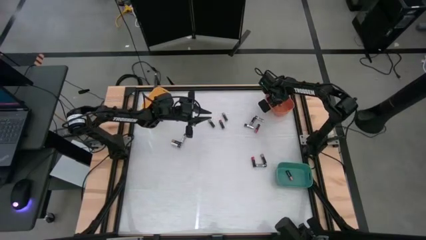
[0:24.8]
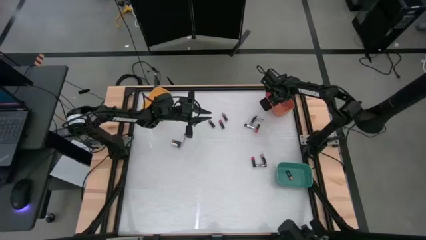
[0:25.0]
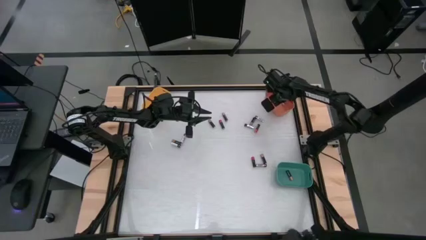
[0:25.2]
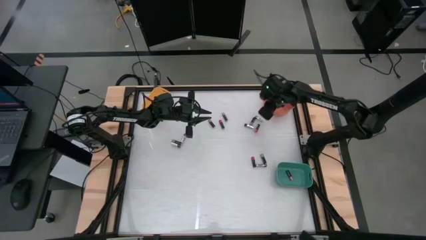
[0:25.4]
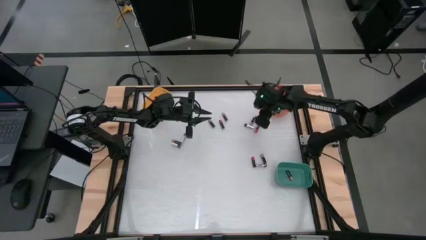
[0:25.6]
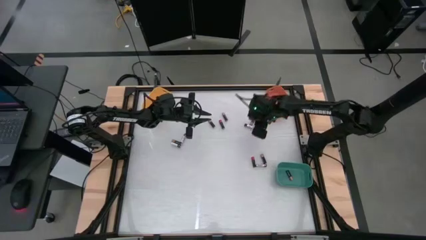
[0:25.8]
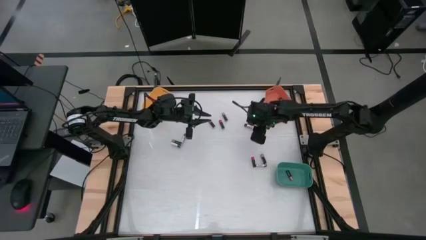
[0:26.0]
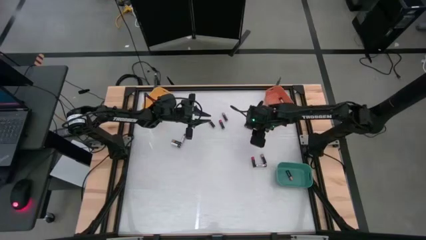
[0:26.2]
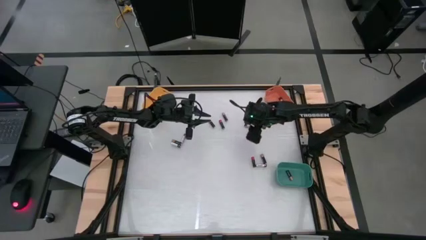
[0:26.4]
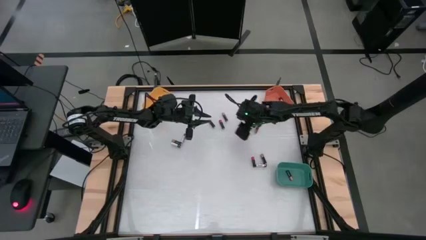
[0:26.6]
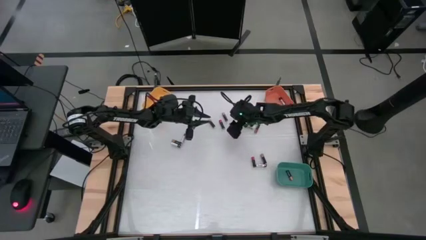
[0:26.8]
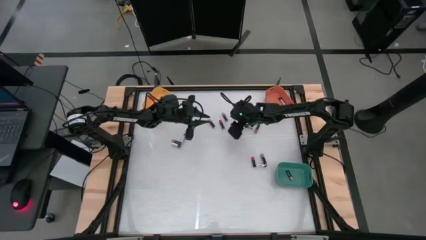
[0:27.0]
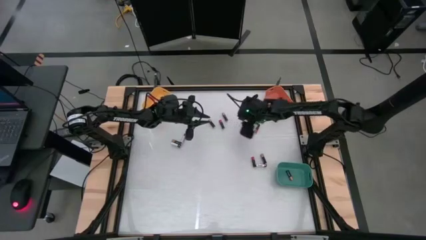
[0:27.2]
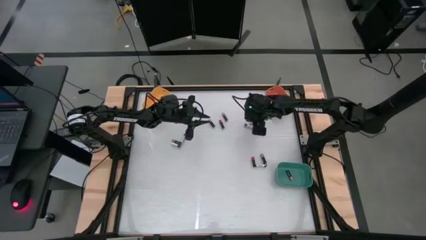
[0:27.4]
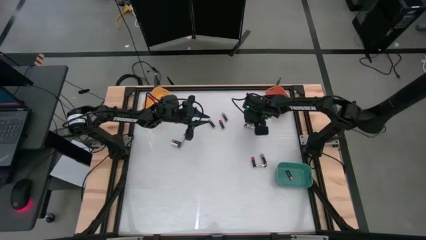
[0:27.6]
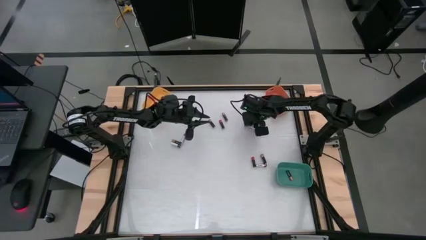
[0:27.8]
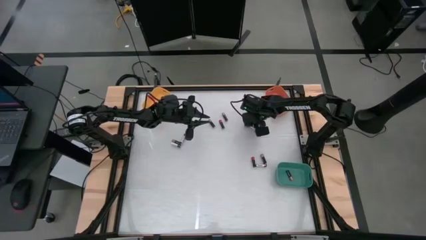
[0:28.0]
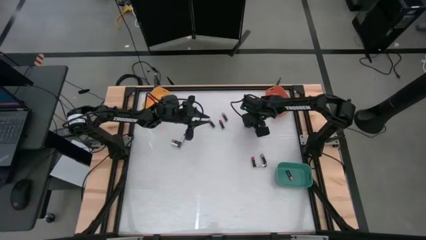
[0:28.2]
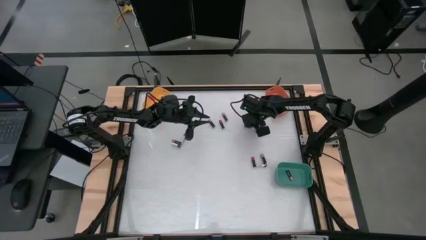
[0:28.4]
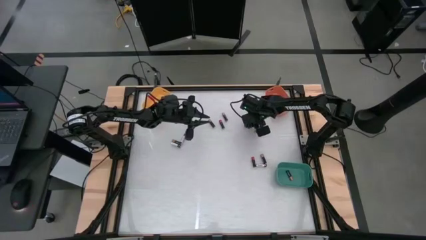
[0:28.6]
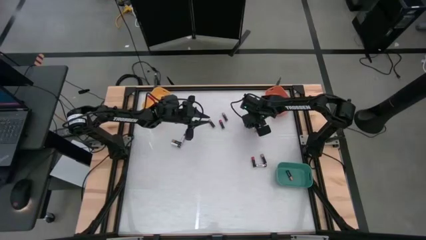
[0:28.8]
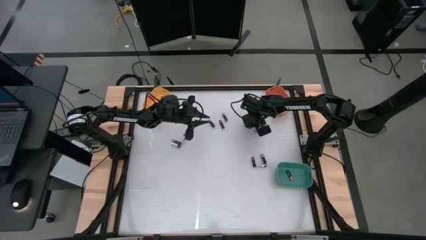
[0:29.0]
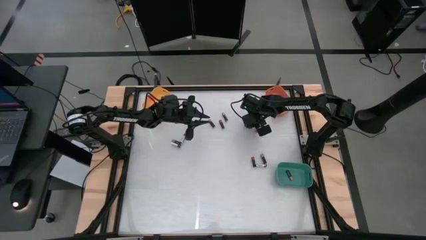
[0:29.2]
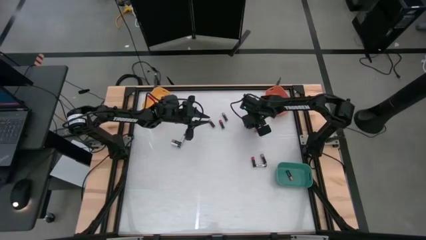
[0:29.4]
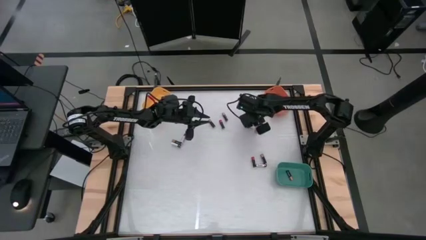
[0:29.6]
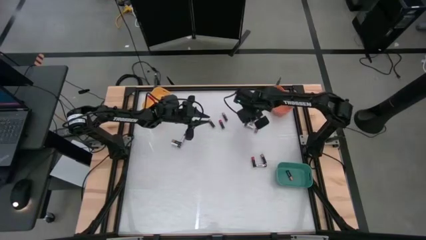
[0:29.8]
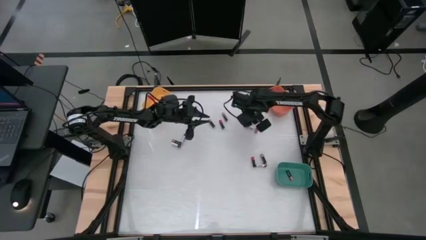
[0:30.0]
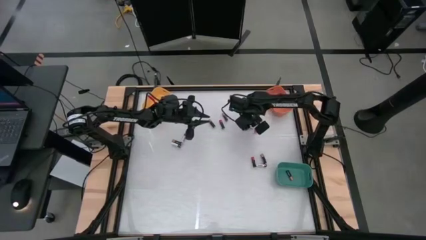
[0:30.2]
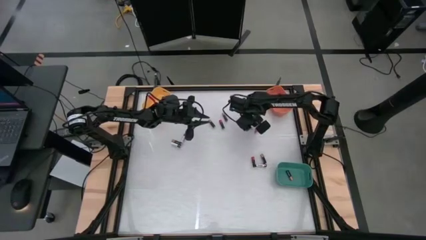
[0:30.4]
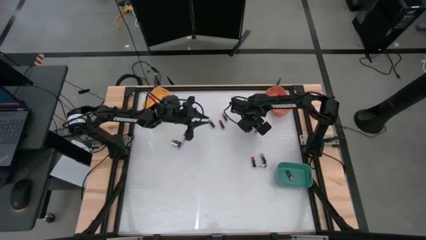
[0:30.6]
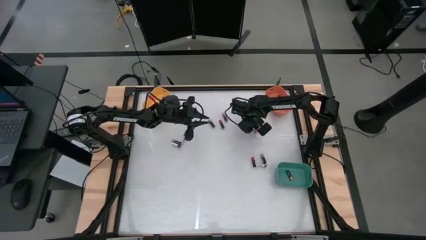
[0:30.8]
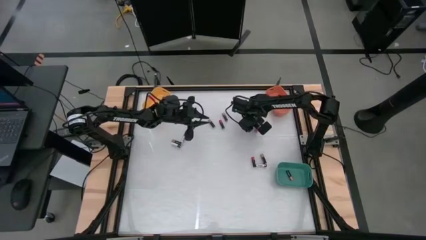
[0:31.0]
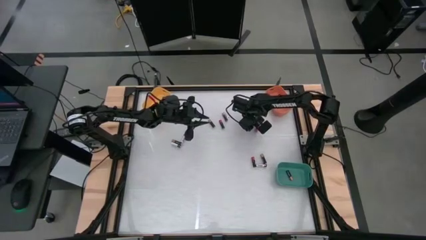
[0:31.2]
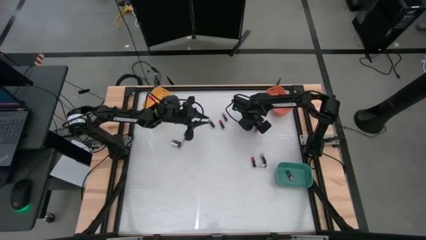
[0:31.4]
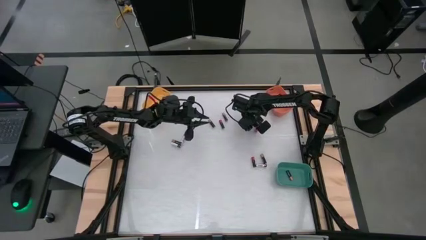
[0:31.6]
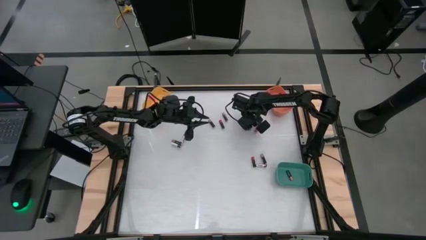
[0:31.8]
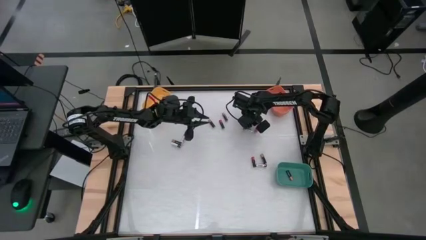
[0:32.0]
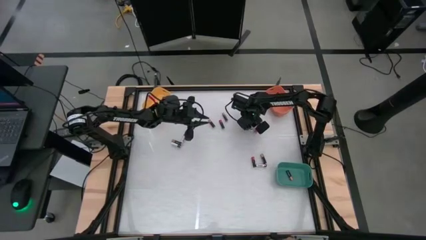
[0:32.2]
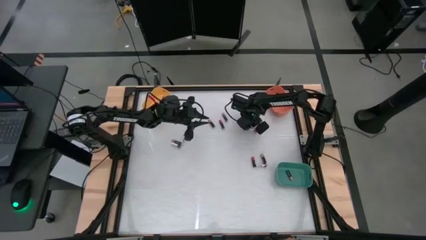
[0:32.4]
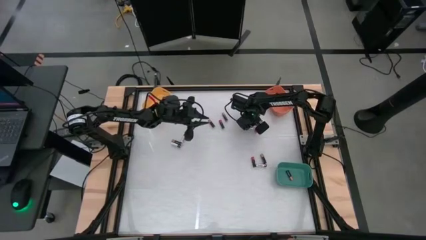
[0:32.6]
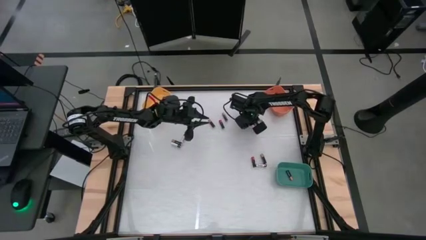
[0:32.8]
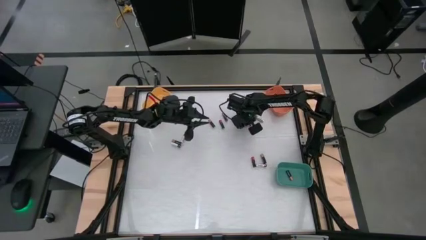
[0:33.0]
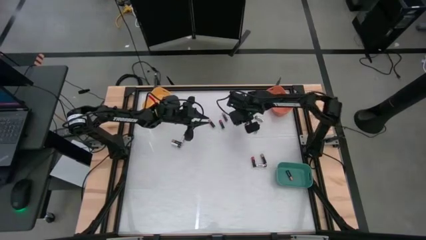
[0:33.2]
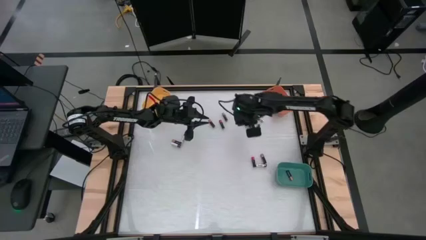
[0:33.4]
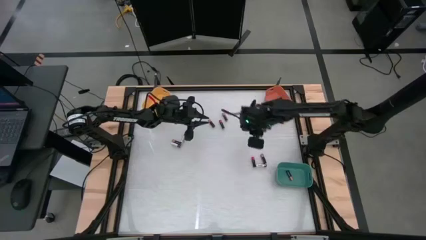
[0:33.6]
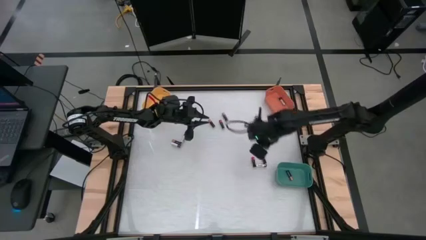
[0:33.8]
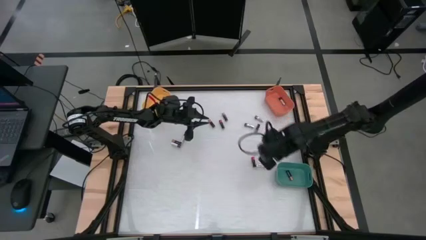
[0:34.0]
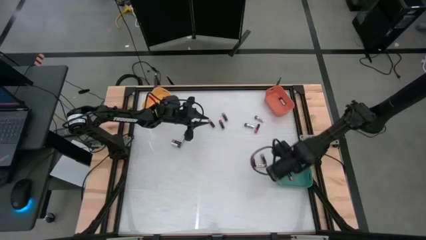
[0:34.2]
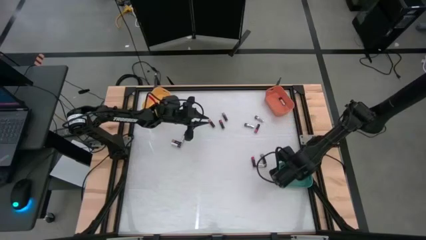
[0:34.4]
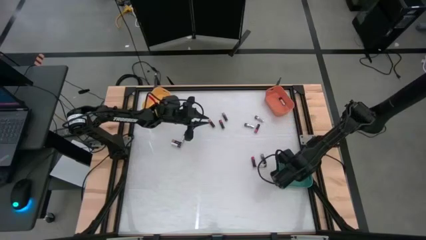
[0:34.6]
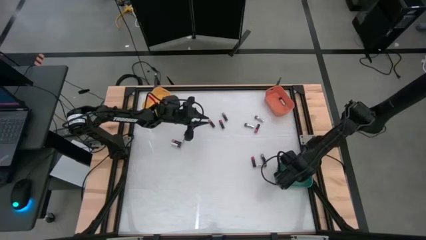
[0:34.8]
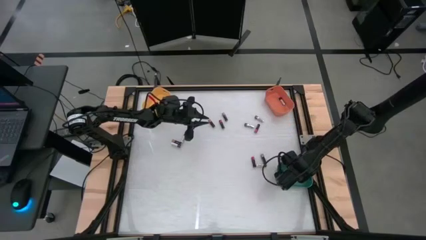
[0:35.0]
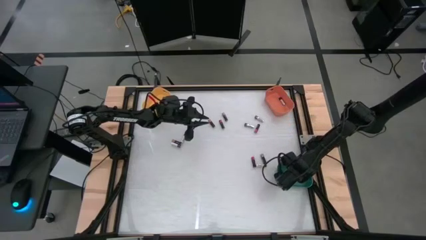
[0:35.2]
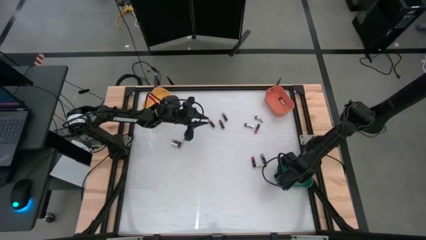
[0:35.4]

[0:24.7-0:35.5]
Task: Sort batteries
Put the brown battery into the green bin

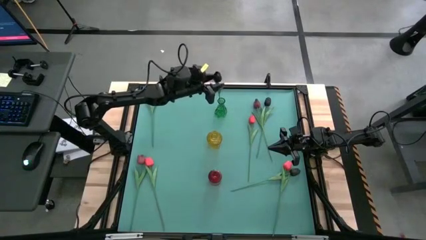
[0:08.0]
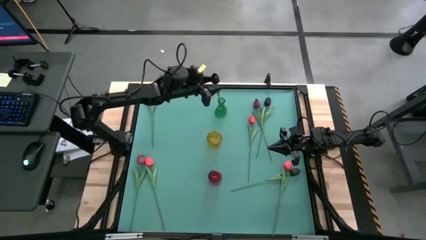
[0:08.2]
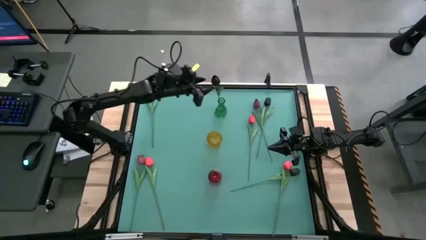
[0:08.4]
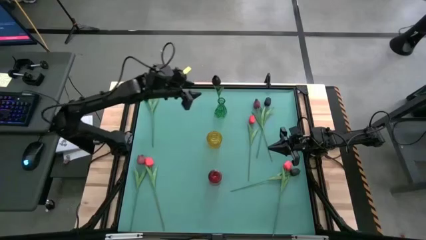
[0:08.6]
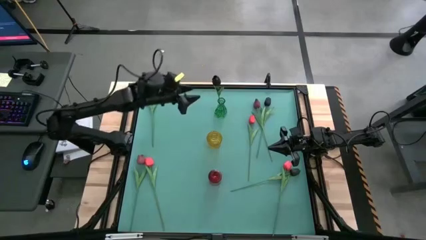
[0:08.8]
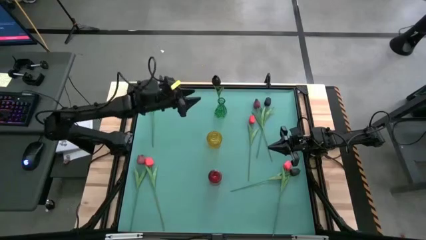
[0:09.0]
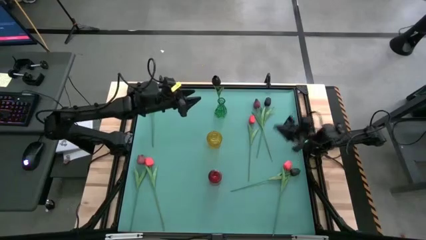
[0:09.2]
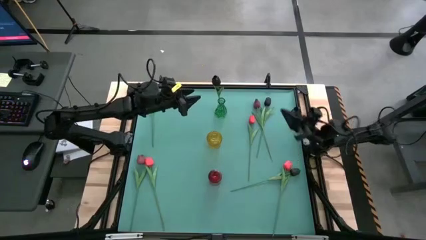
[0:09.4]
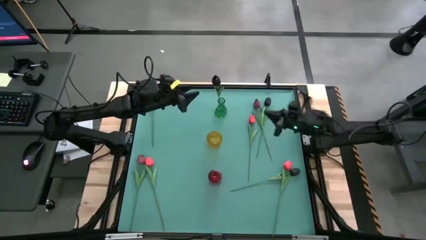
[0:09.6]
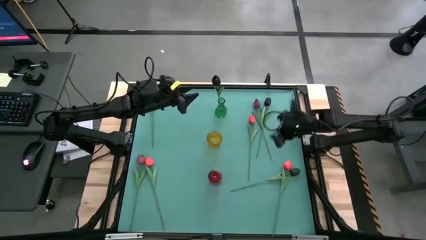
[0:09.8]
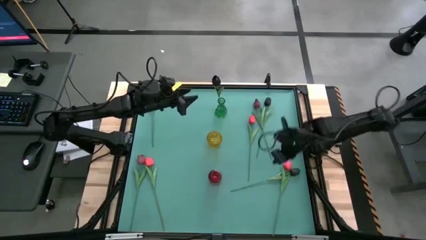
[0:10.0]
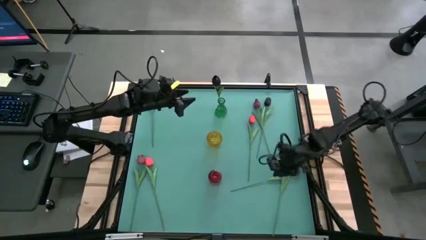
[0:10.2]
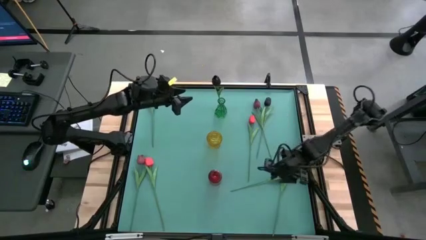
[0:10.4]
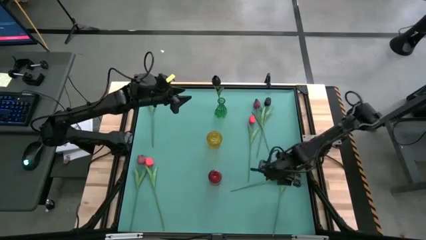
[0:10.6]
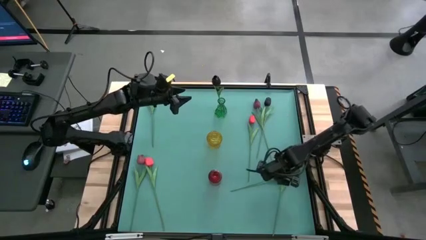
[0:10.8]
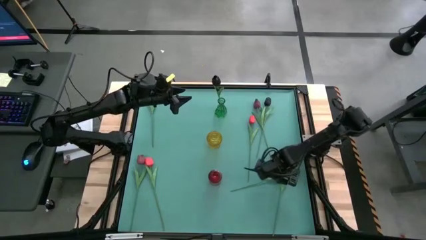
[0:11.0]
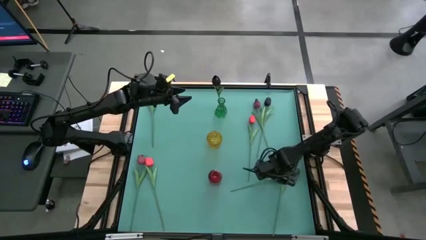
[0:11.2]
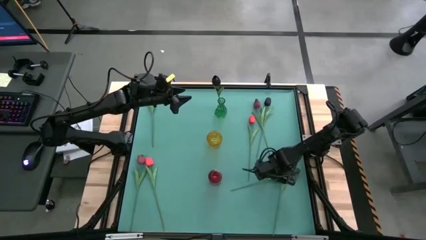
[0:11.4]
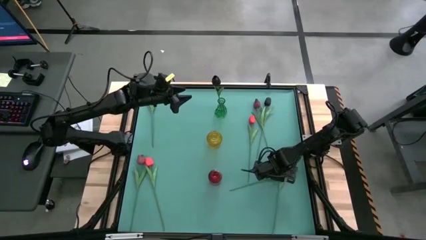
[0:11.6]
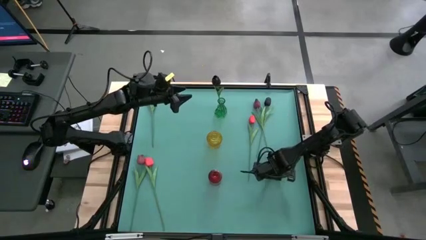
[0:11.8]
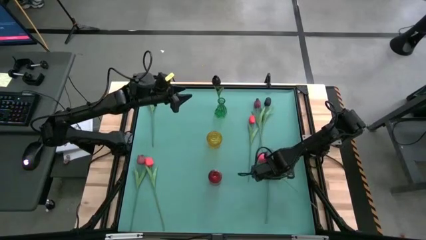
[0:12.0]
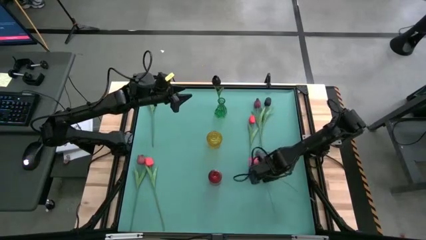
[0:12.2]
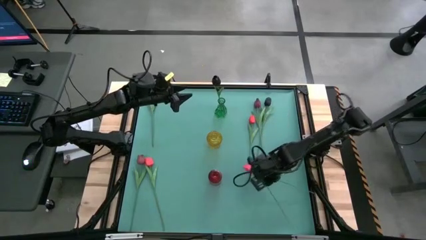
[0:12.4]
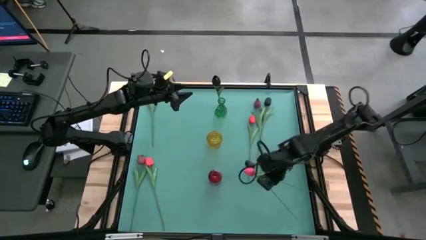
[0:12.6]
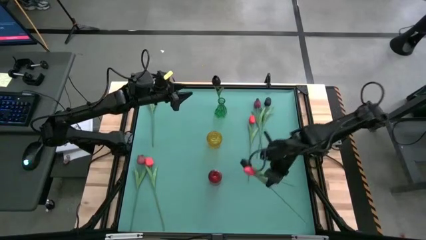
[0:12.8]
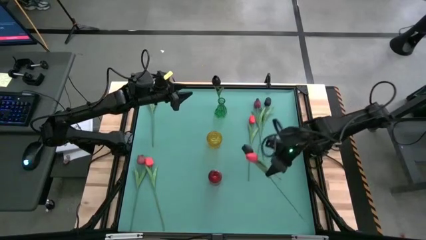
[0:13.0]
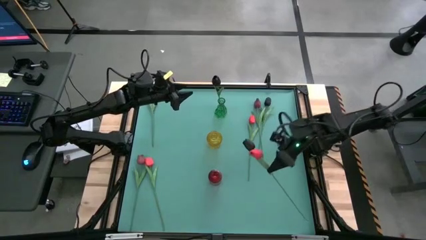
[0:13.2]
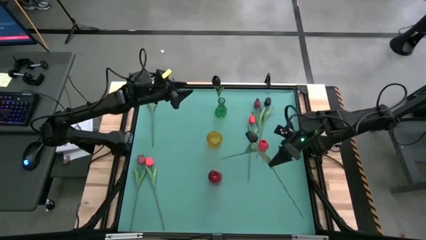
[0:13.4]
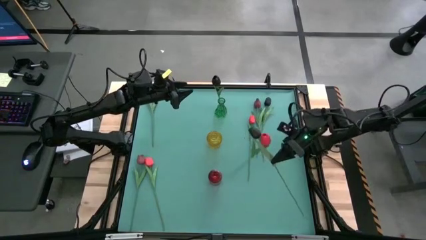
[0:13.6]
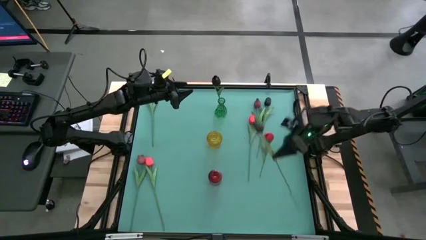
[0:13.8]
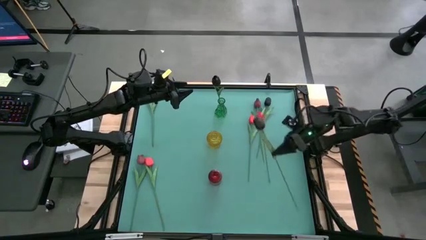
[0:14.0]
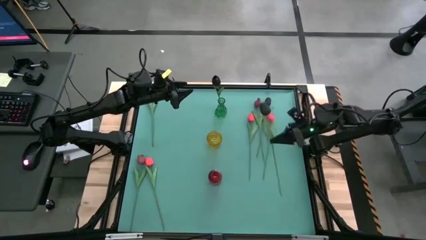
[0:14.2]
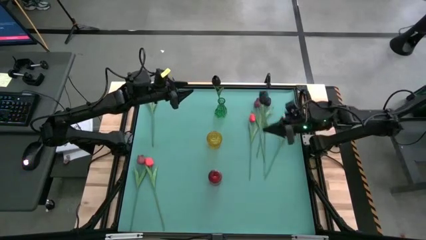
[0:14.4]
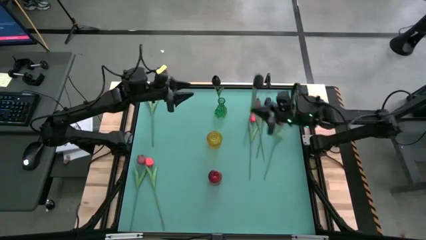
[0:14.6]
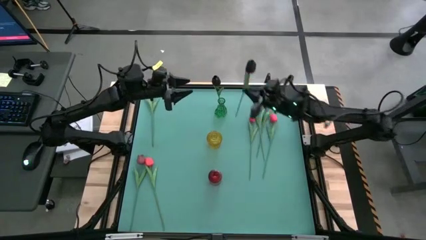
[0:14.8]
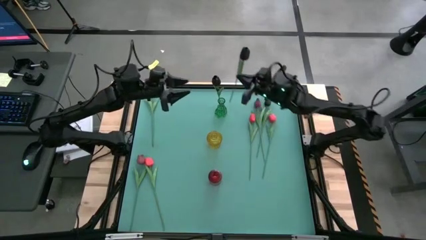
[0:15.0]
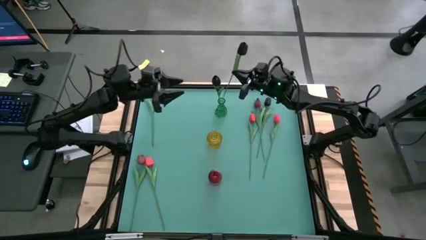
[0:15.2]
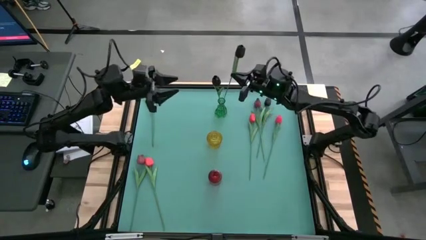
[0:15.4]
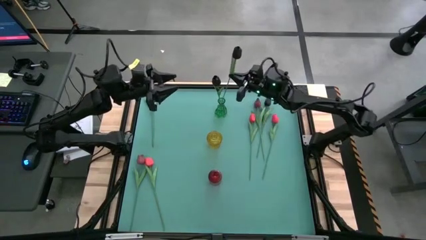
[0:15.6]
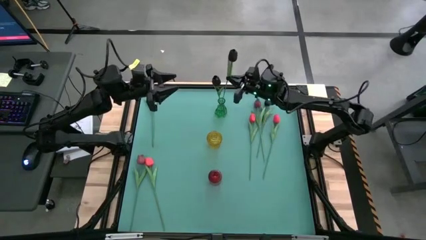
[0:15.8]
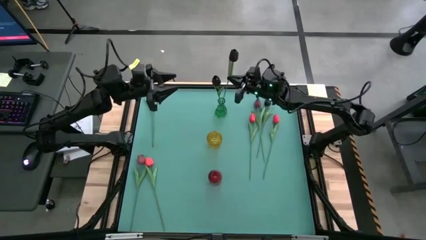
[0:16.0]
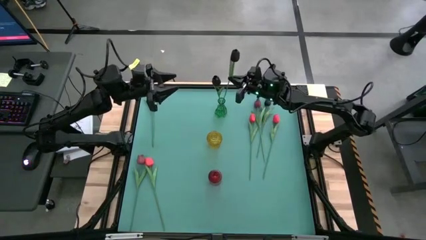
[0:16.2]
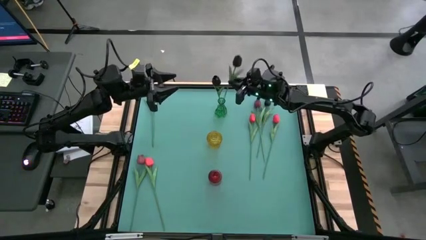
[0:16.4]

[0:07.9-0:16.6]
Task: Sort flowers into vase by color
Put the bottom black tulip into the green vase
